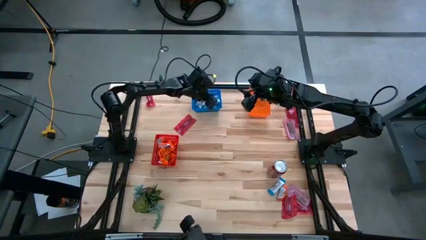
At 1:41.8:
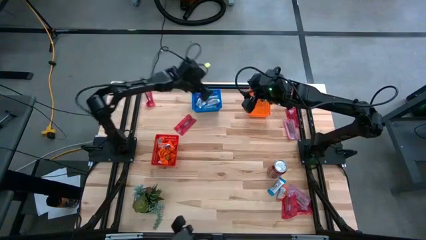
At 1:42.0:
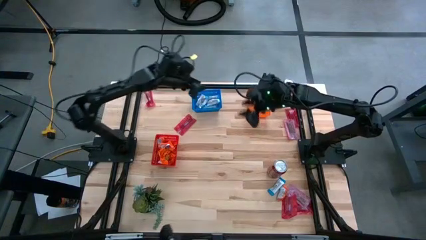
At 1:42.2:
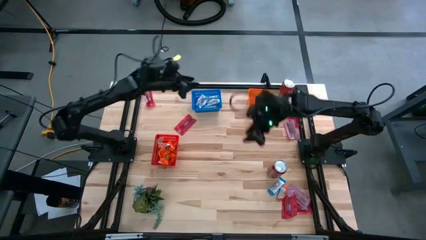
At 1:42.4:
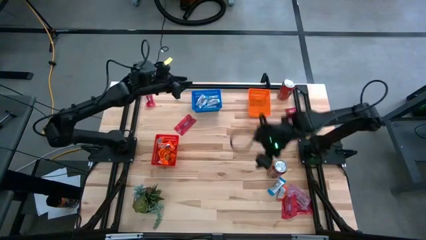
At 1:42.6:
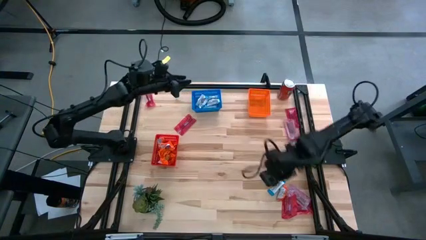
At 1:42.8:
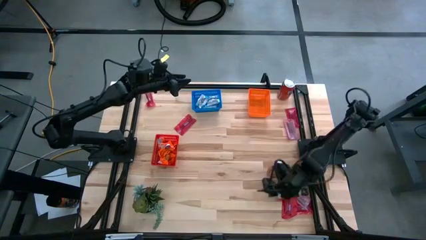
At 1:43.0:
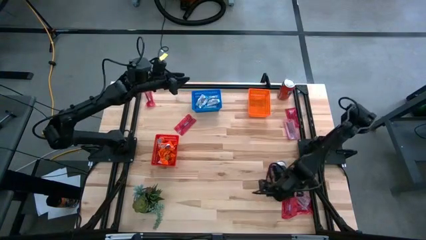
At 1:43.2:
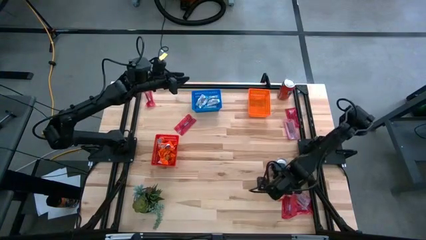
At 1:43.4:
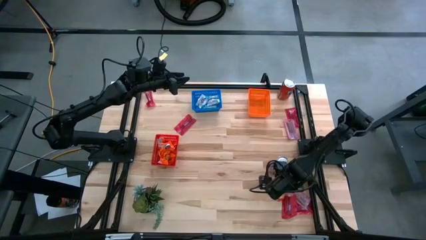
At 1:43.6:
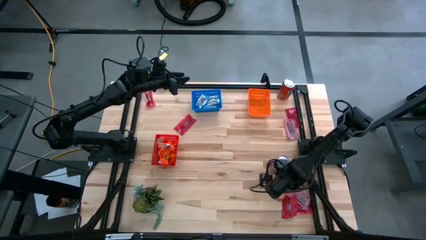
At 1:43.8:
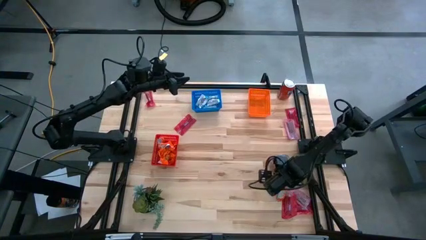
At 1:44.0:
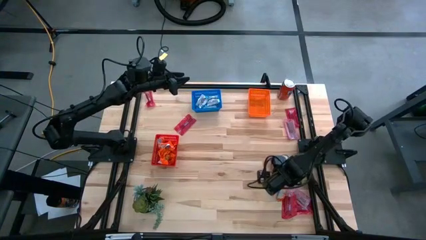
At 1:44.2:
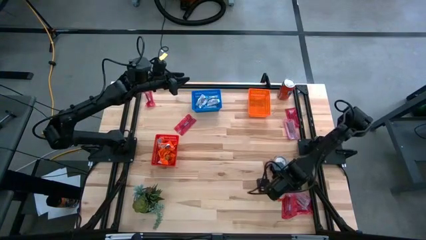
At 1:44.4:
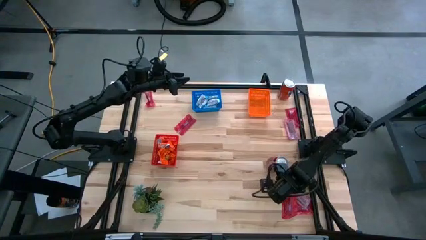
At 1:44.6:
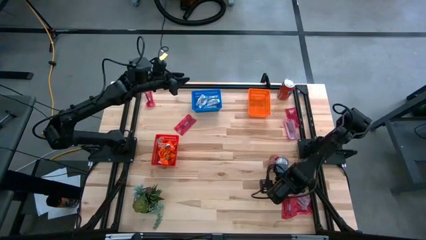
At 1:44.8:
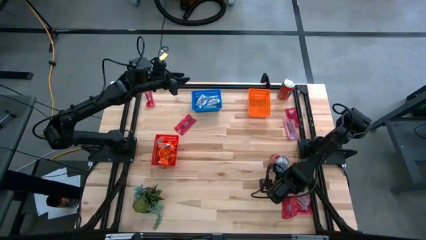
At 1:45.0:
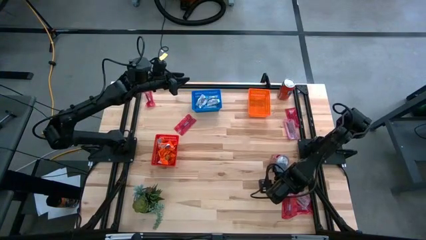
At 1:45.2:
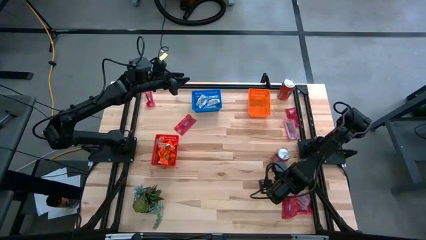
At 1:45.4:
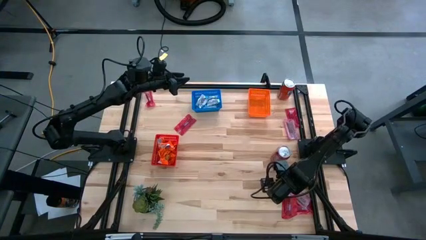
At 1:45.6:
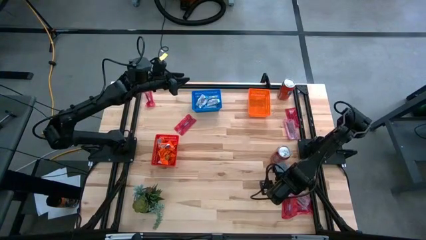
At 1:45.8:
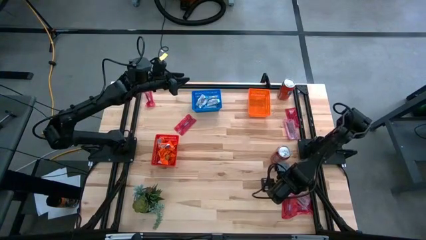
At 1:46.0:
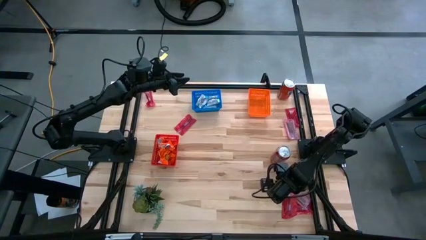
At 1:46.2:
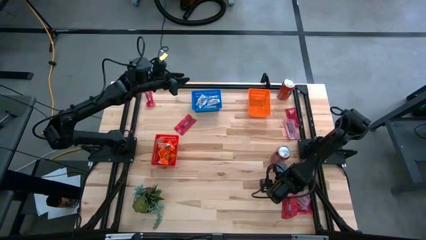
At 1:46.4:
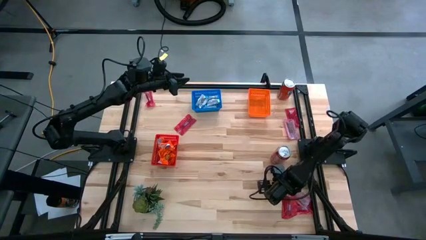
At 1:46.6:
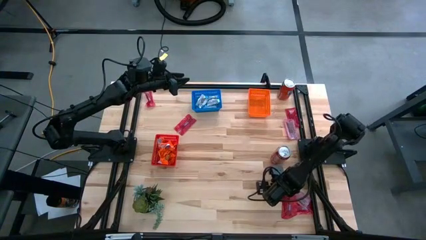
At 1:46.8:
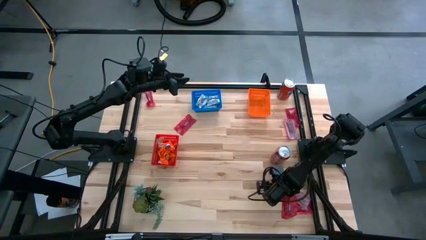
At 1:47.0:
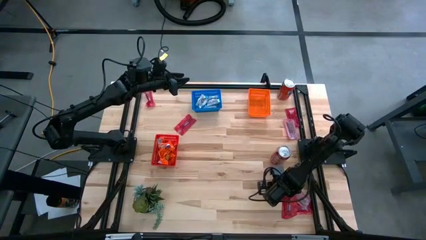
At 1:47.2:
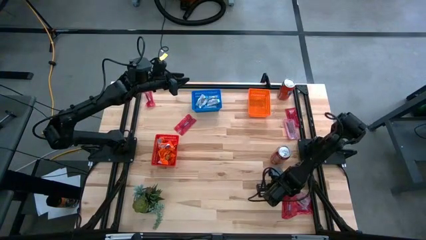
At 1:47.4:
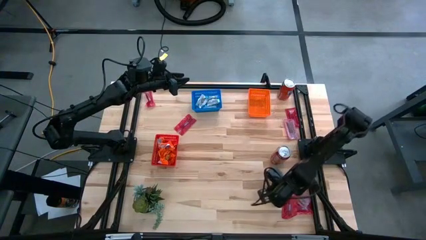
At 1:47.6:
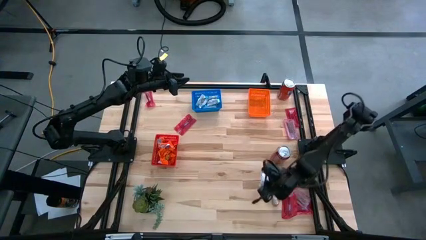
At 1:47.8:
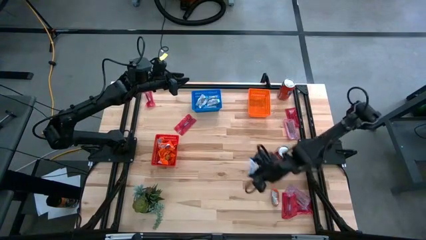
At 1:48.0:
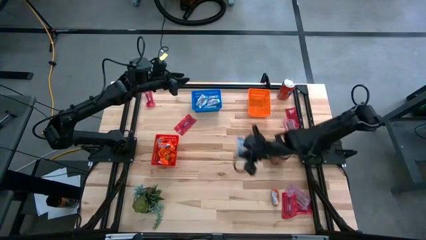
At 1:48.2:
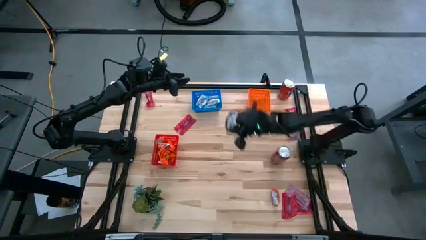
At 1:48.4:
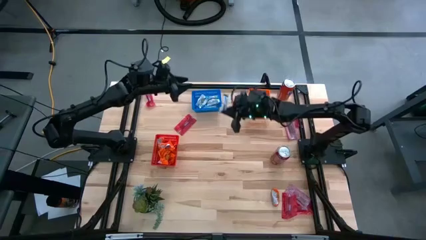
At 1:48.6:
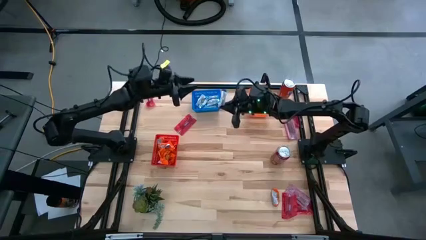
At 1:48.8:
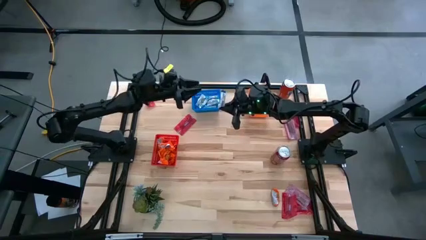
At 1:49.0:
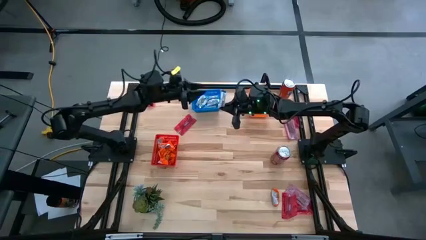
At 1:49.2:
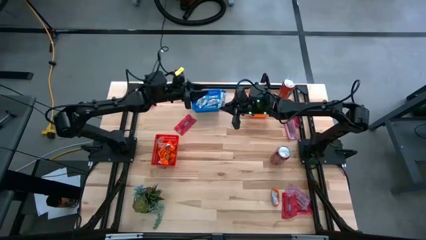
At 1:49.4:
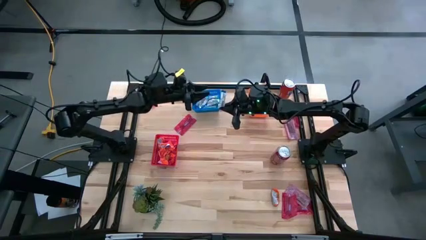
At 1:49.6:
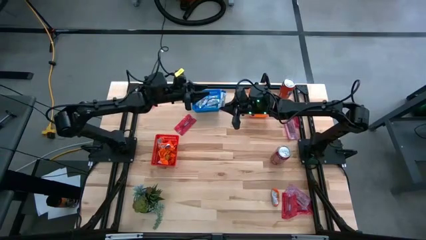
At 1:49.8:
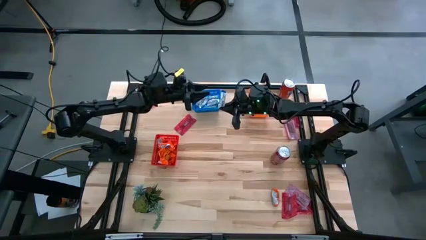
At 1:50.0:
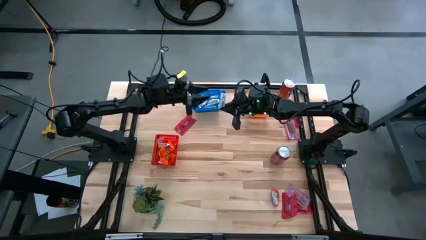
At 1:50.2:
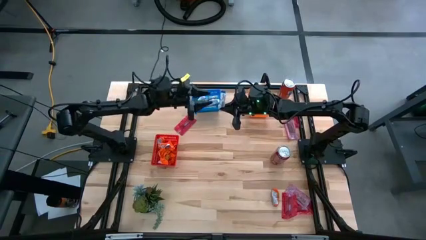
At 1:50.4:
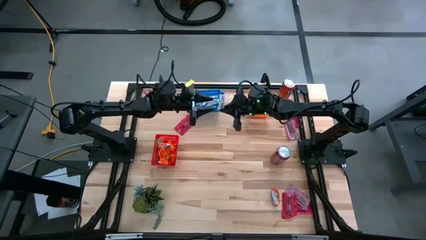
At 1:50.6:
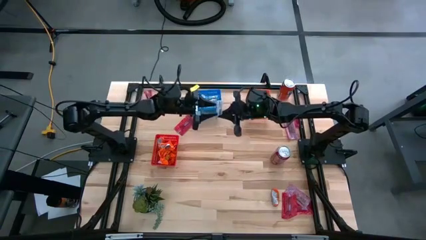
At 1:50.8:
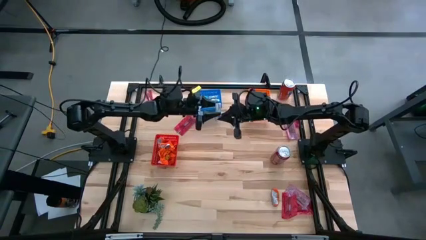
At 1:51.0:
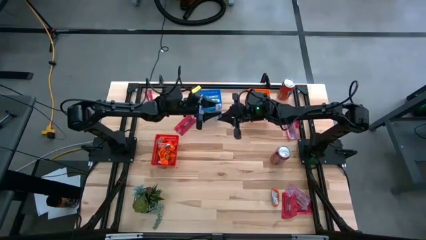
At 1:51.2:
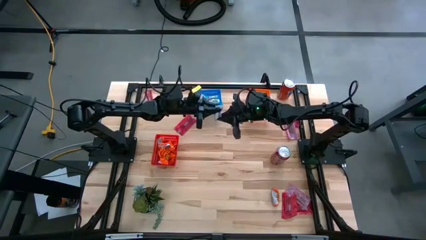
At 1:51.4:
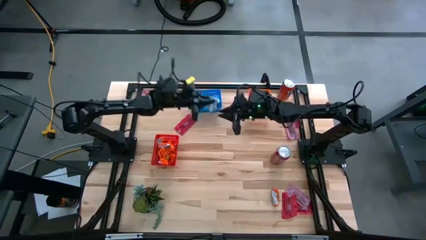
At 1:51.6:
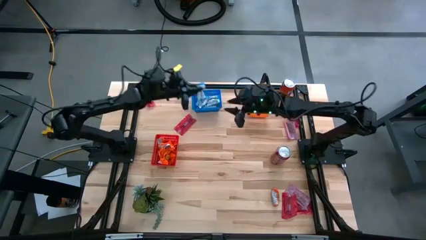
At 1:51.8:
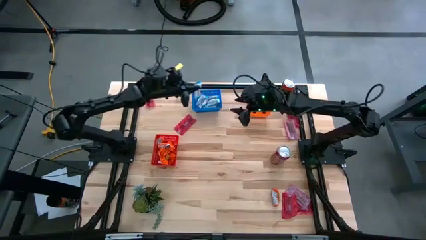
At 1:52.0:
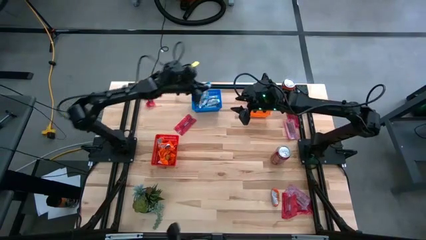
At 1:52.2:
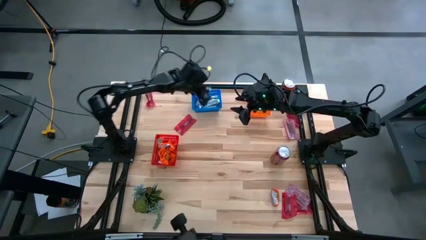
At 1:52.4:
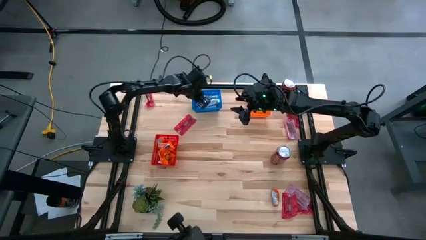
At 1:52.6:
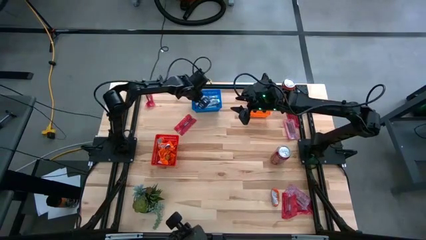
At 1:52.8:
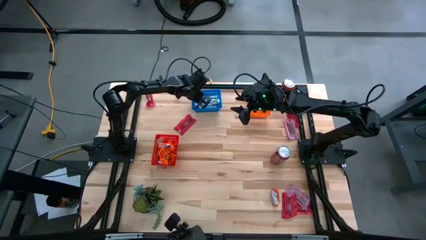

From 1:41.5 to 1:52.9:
Task: Sort candy
Put the white candy pack into the blue basket

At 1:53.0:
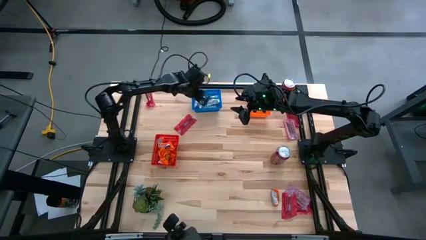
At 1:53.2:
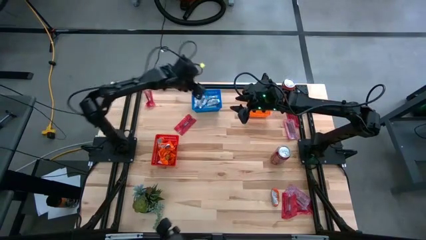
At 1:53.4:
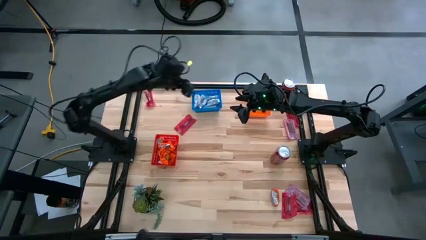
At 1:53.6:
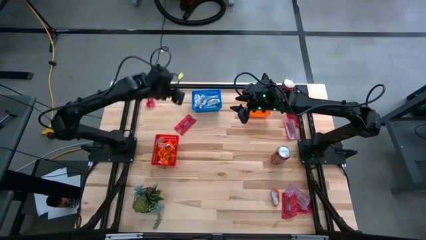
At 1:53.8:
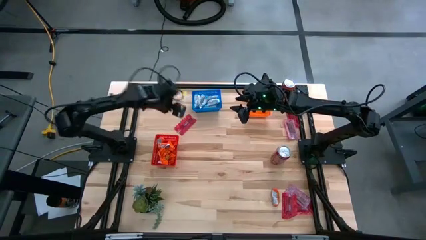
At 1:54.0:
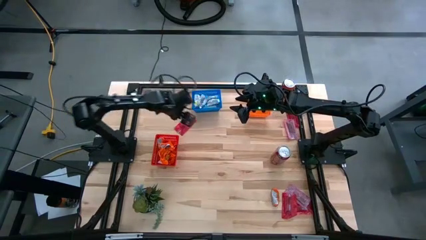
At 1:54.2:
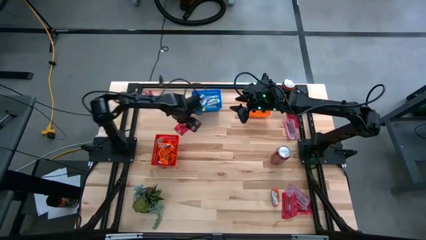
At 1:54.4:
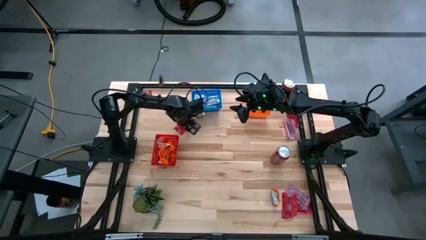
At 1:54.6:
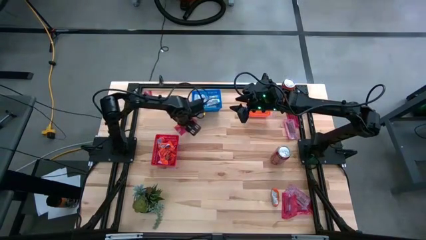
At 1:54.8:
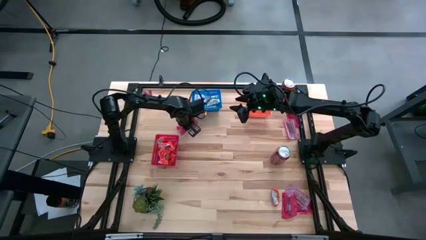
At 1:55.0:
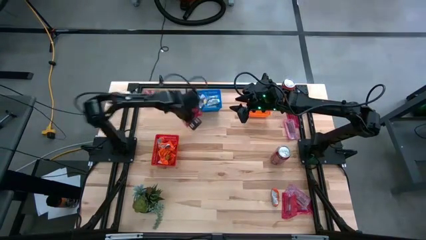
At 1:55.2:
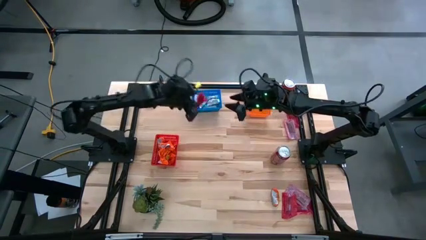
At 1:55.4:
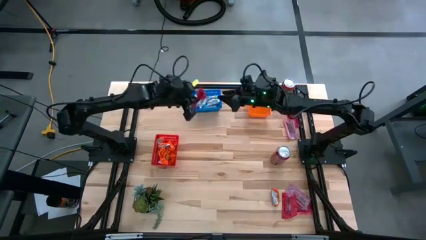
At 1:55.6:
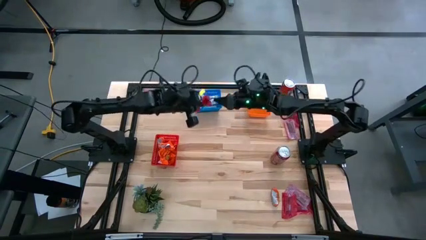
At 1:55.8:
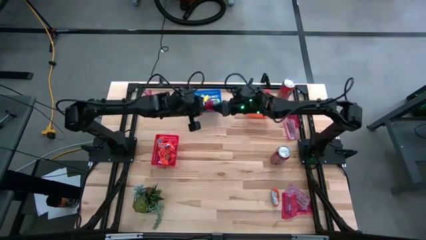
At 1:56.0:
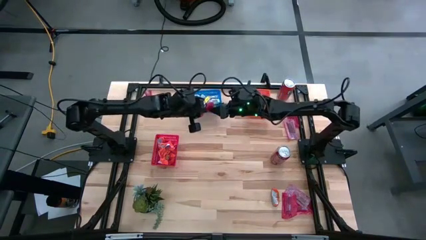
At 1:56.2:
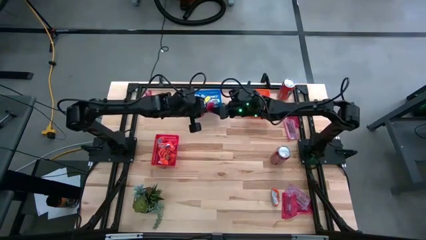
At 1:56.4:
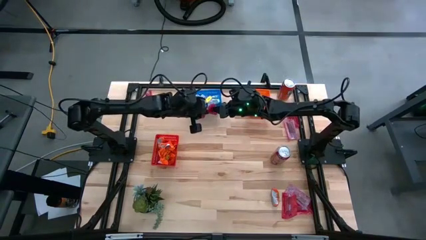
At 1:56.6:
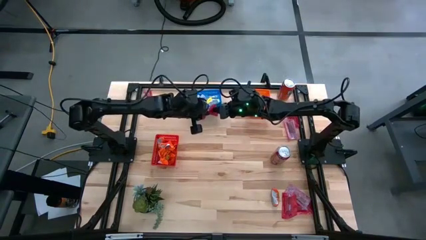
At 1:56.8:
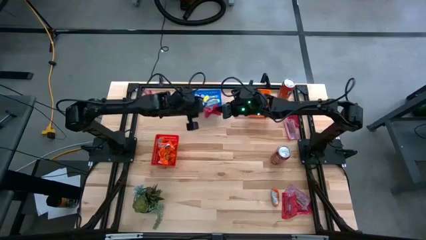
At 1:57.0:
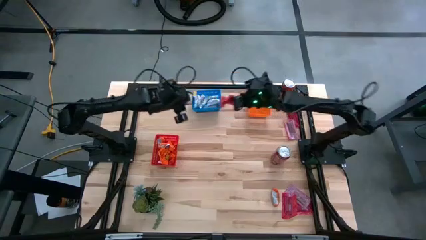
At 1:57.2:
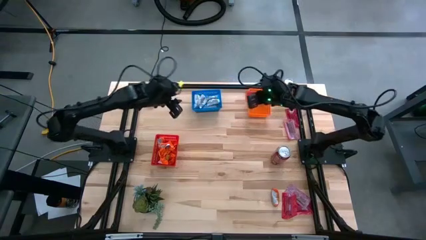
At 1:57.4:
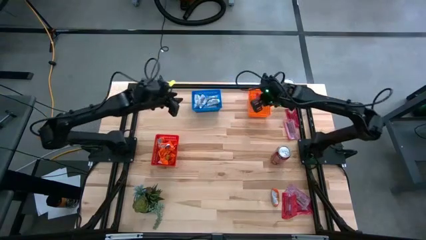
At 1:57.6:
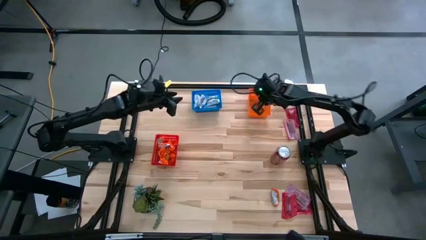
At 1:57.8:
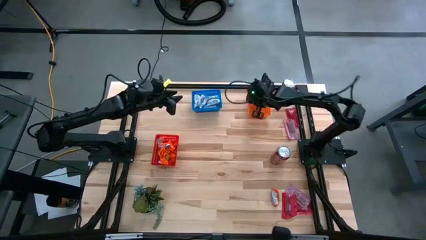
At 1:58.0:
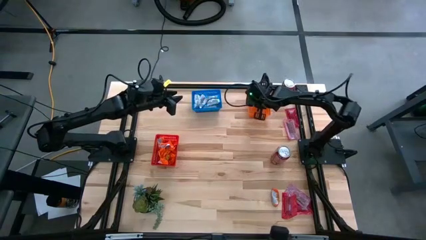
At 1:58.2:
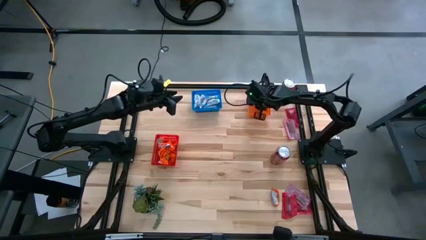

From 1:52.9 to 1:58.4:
Put the orange candy pack into the orange basket
